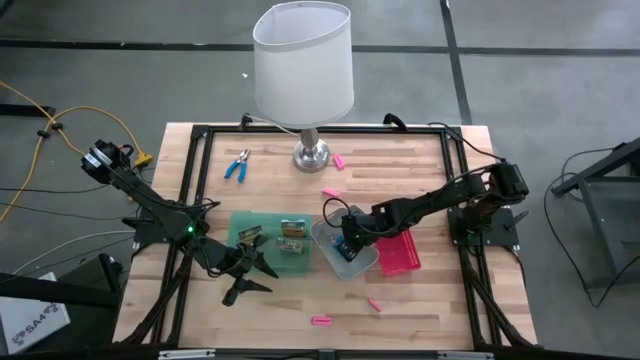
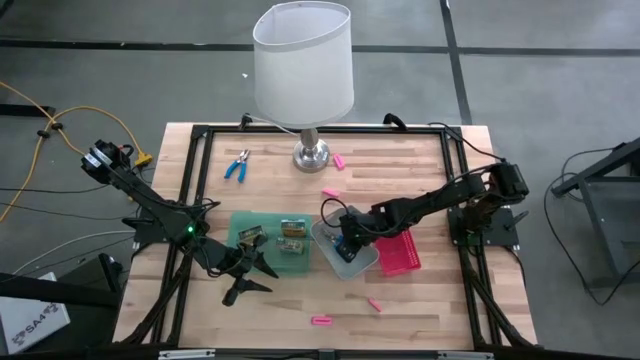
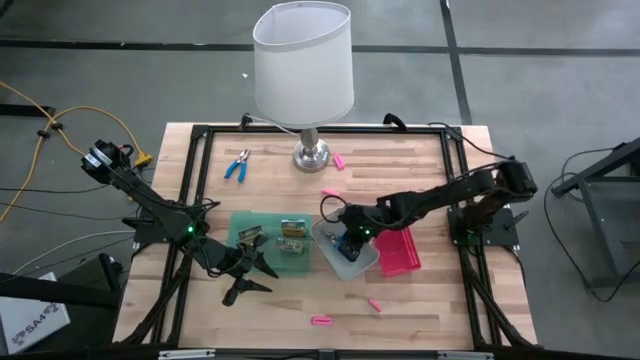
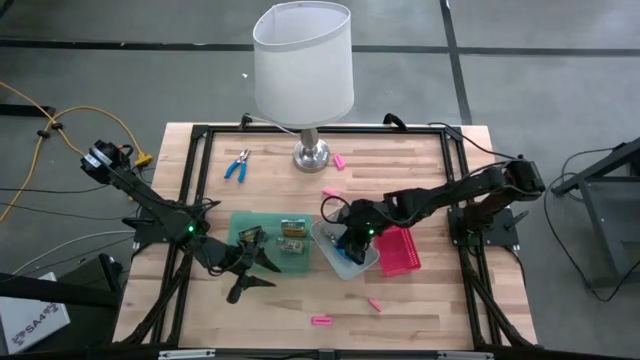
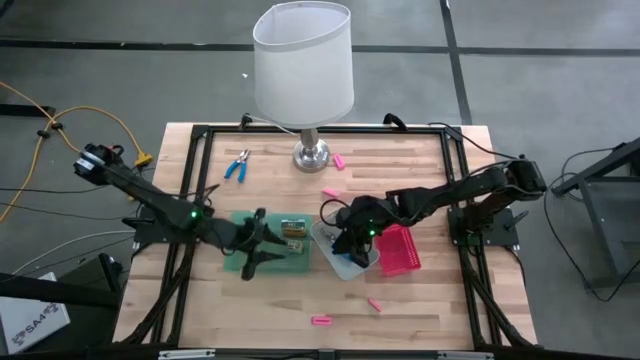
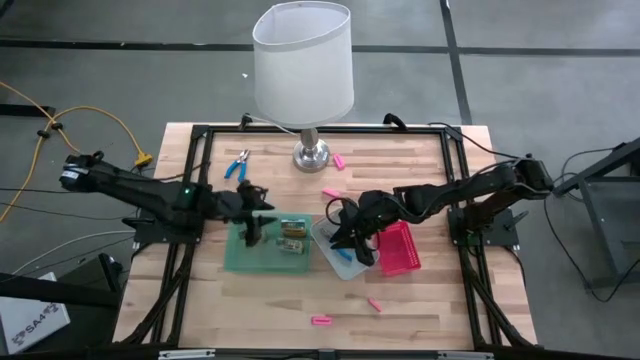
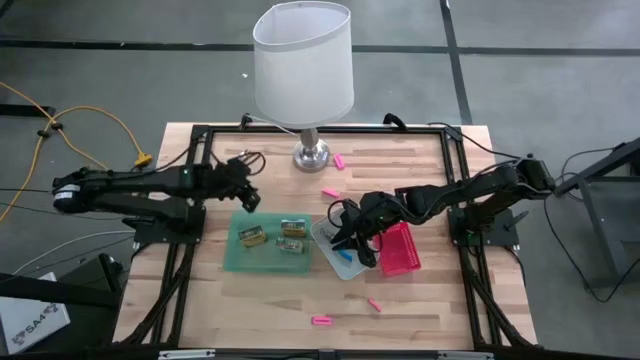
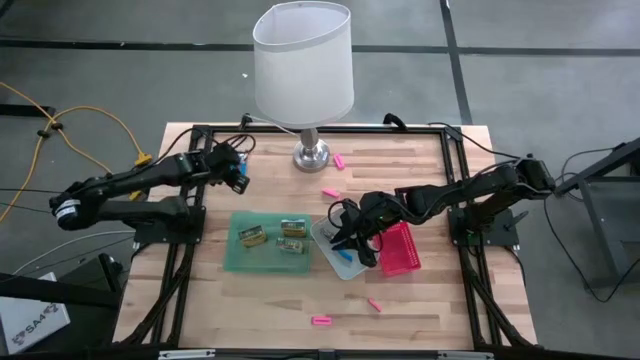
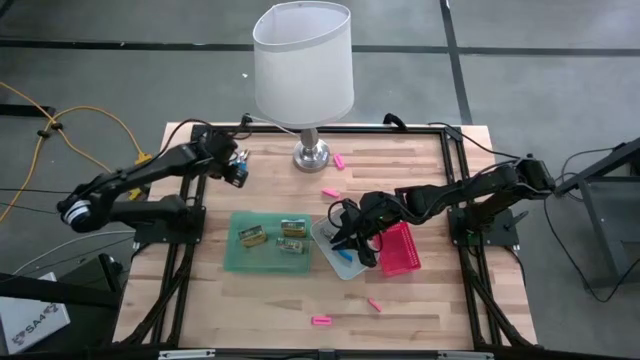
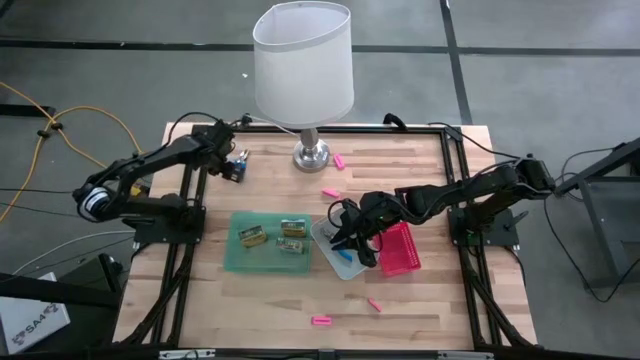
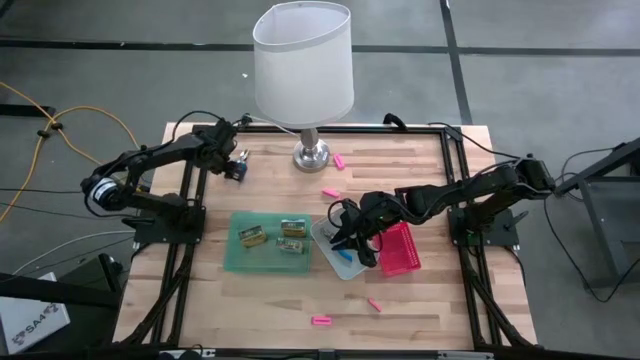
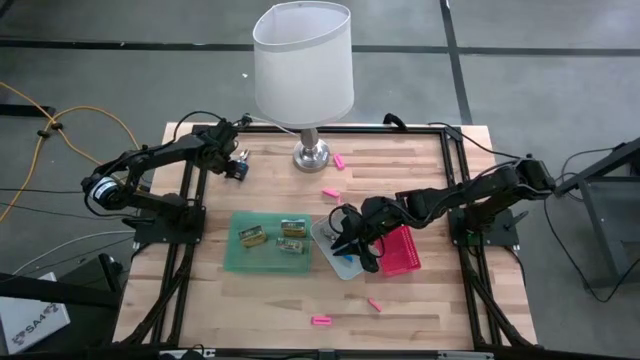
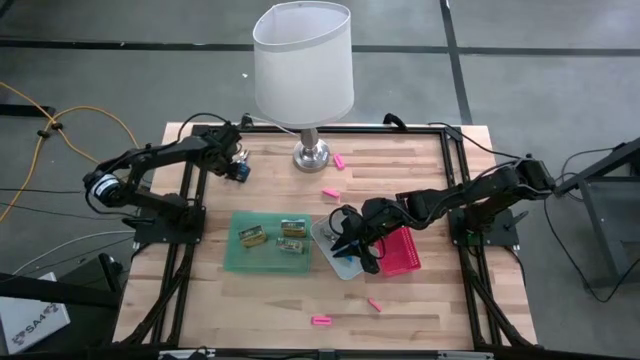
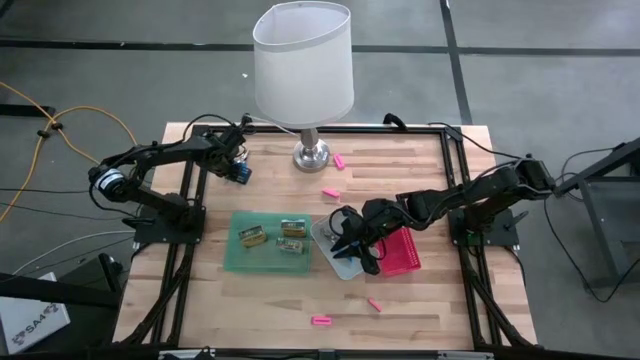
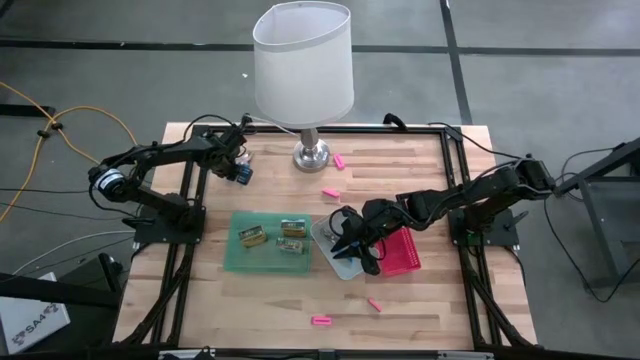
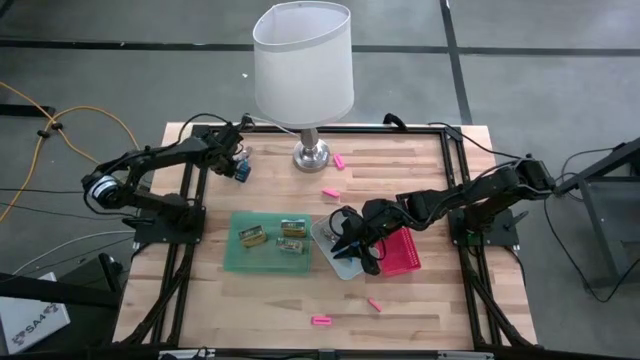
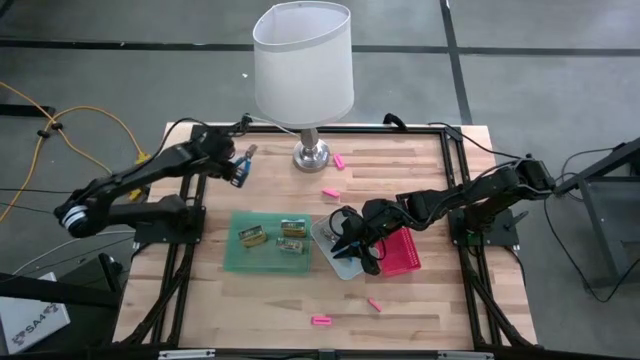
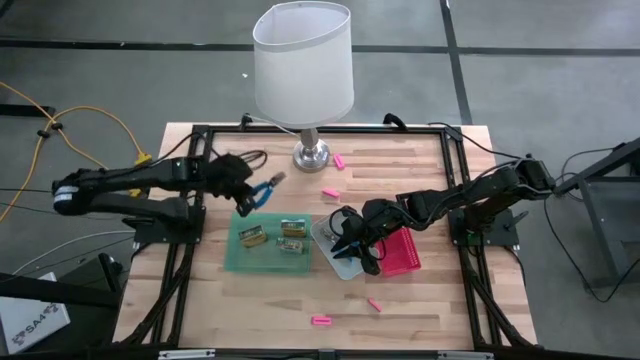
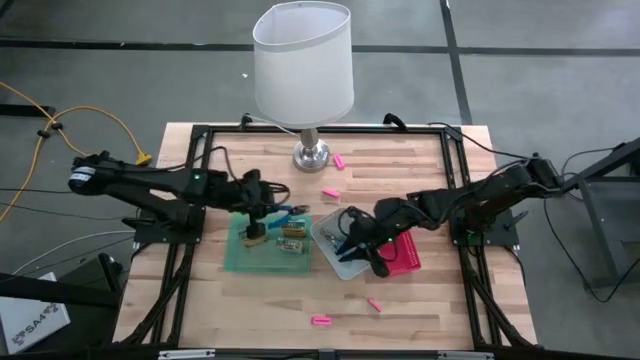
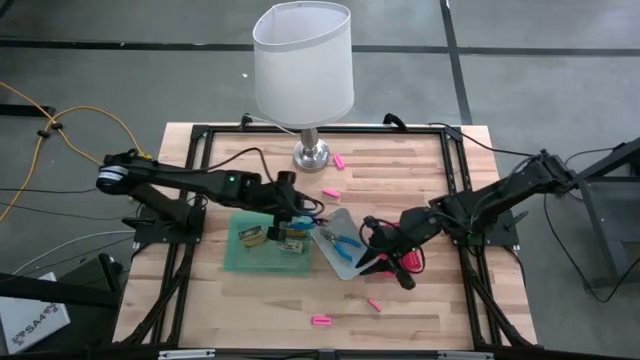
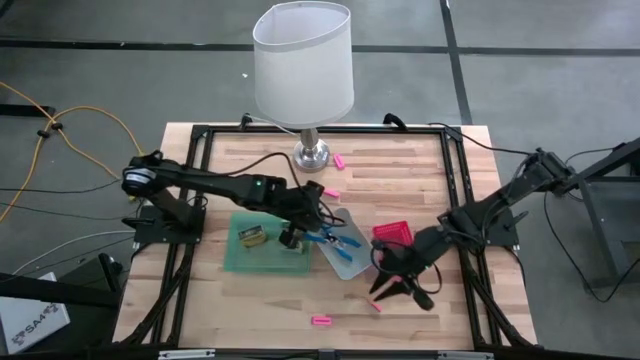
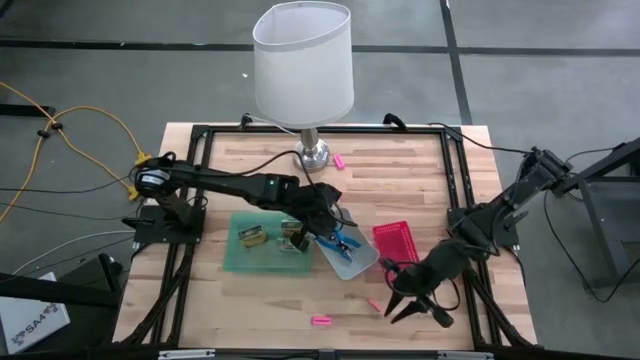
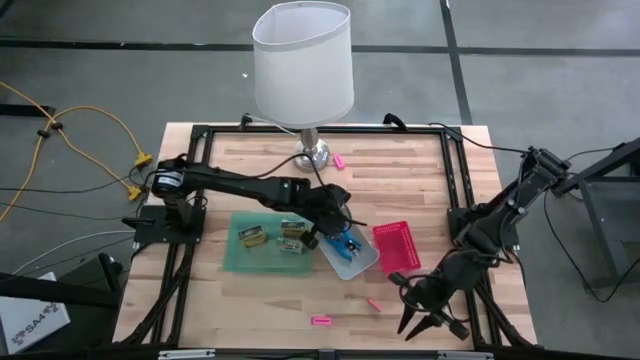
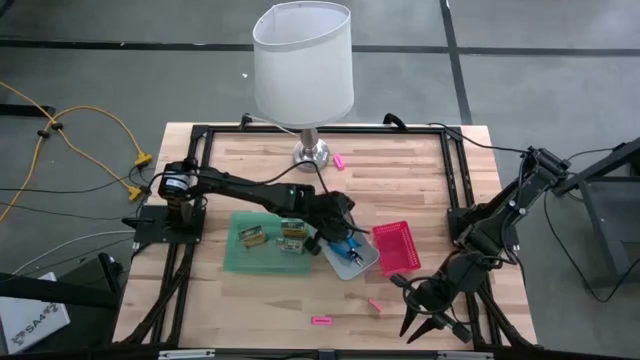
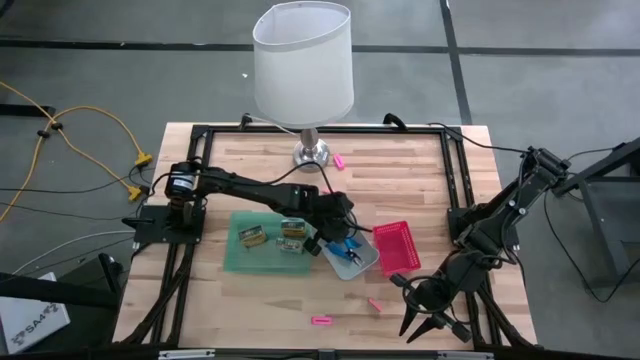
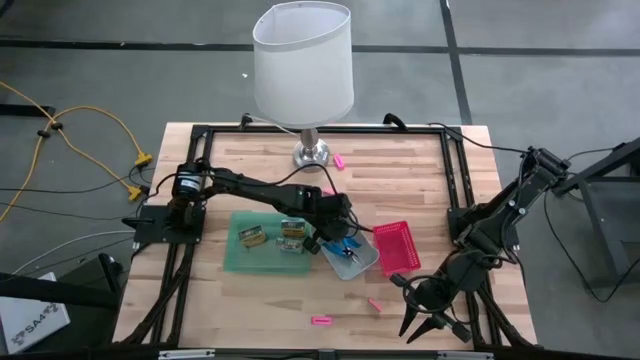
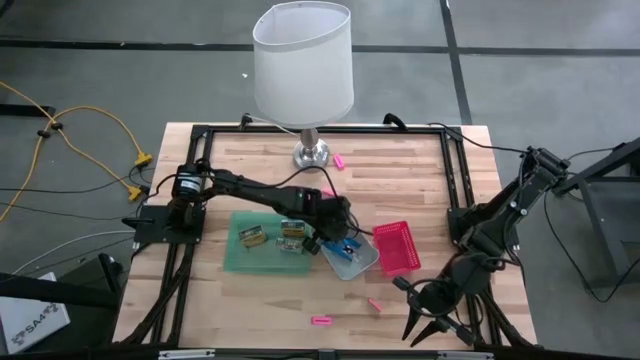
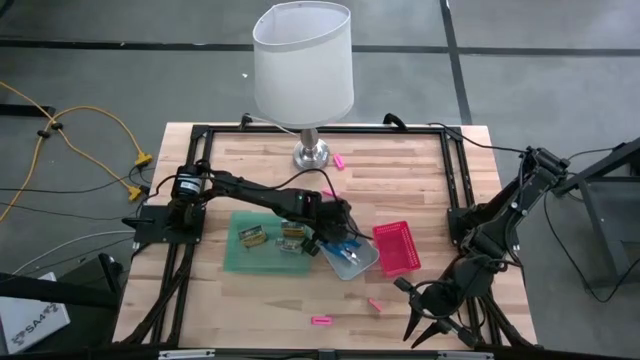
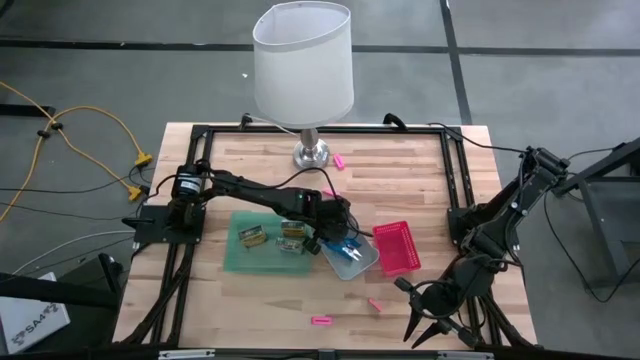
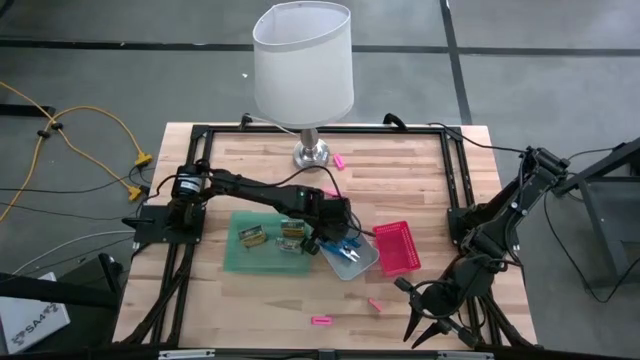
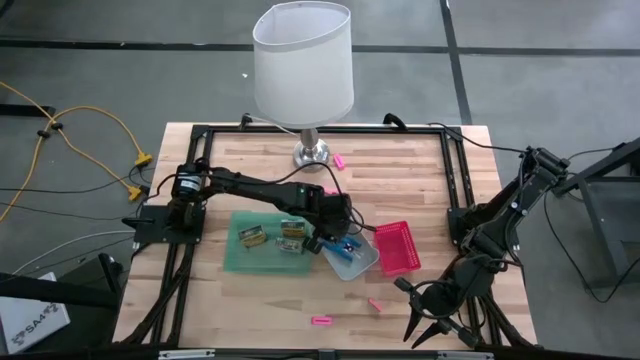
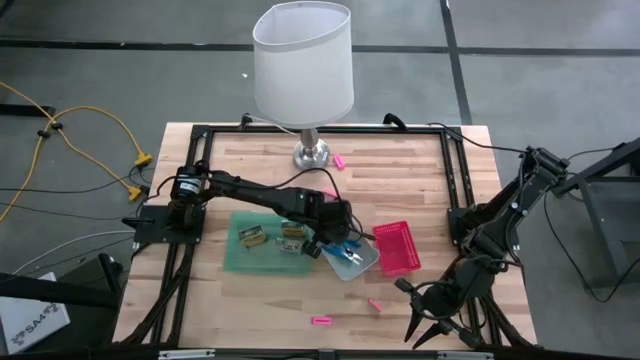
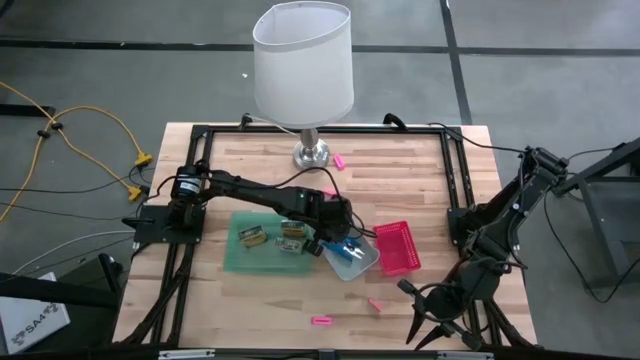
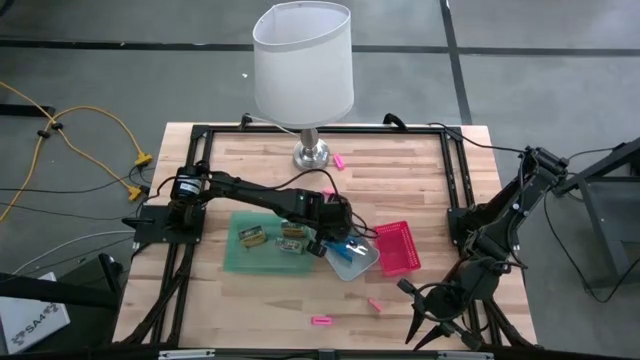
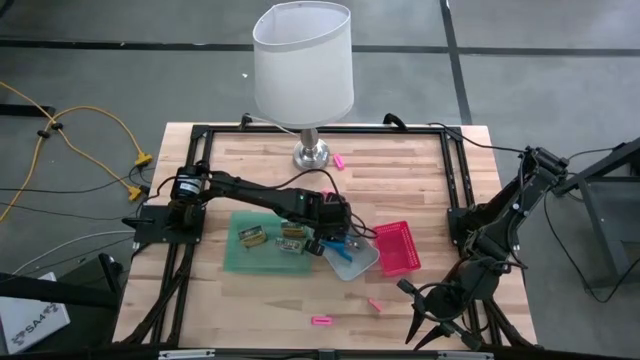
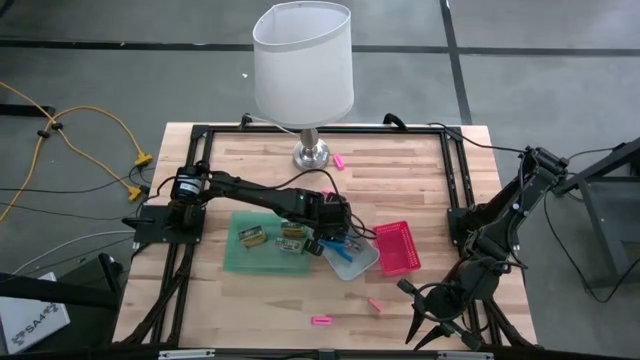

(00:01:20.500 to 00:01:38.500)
Task: Pick & Place School Supplies
Put the blue hole puncher into the gray bin

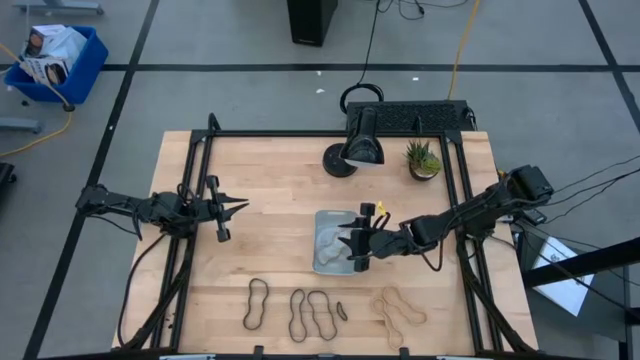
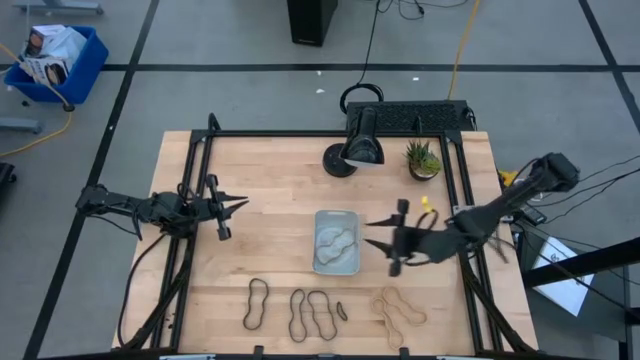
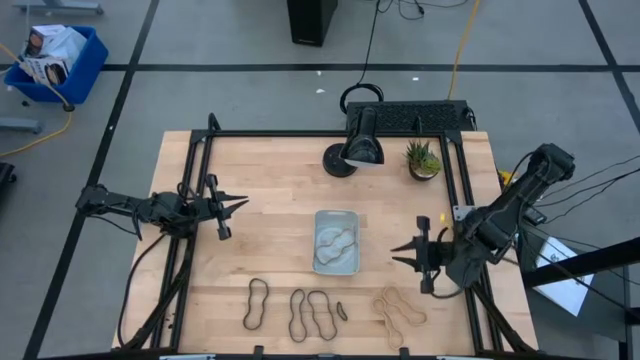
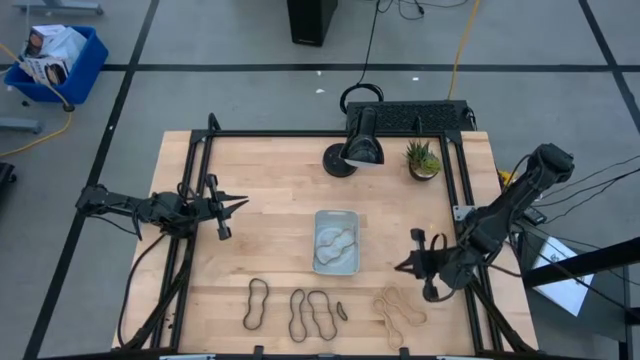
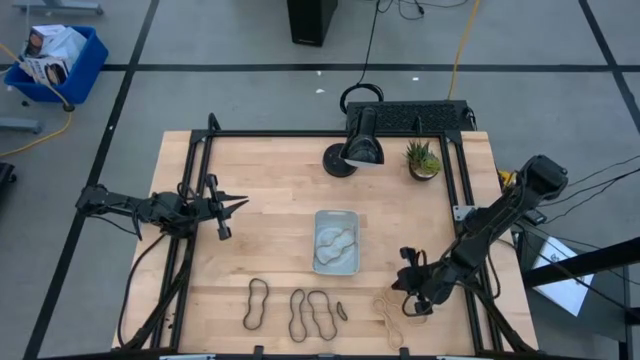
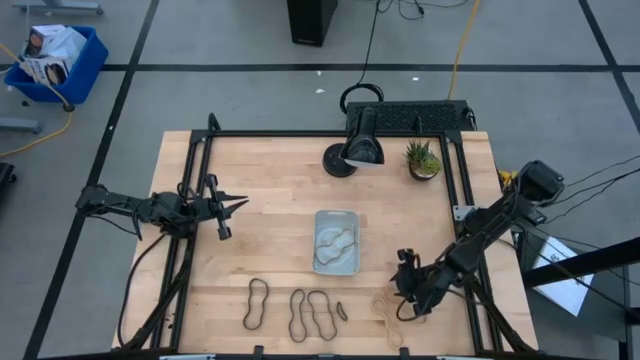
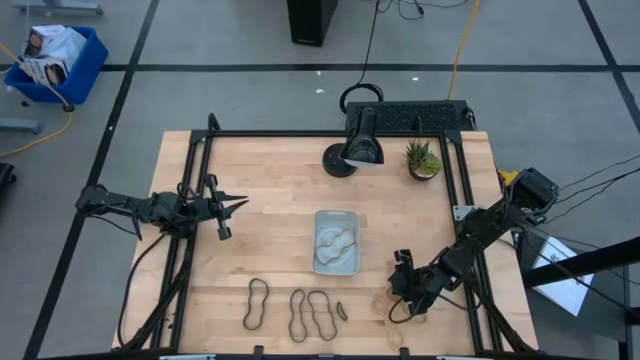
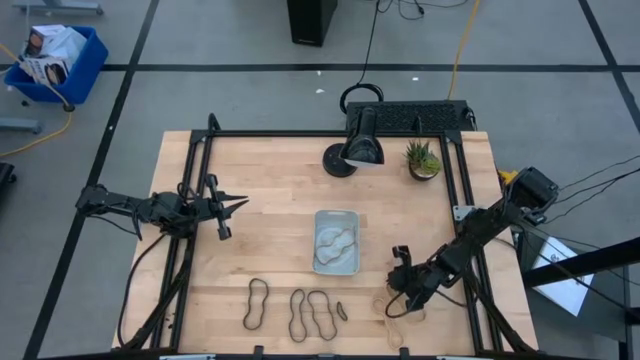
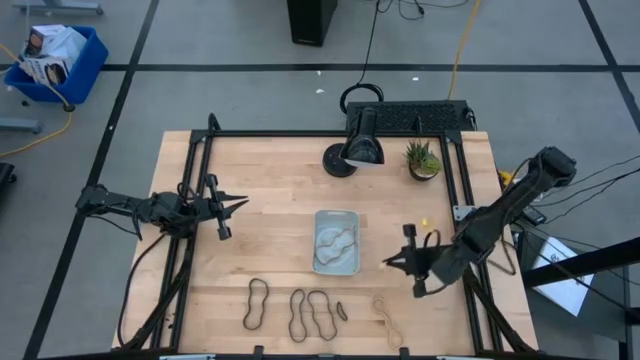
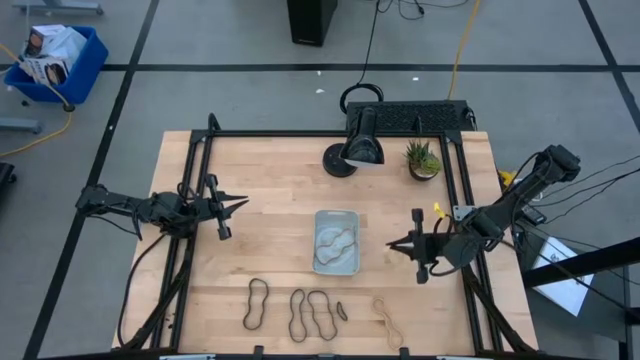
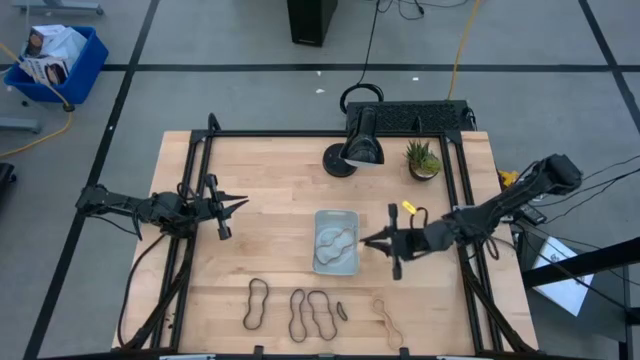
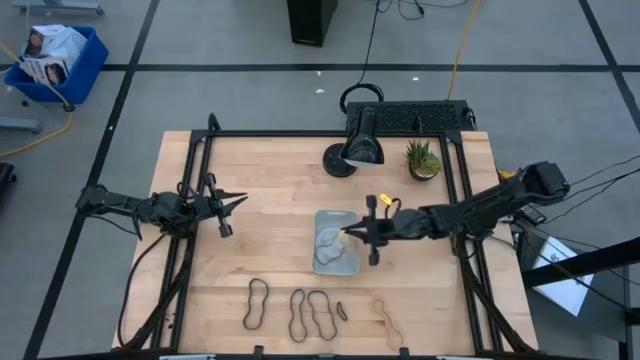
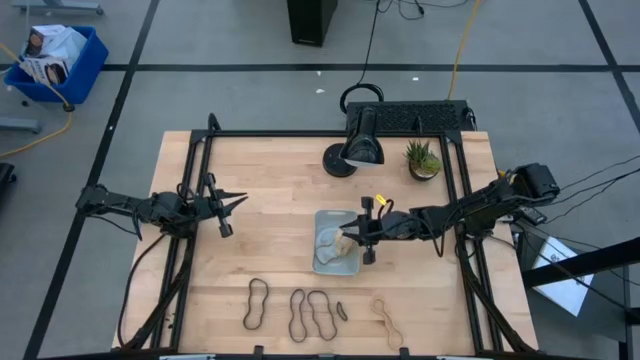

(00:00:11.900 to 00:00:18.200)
Task: Pick and place rubber bands into bin
Put the brown rubber band into the gray container
